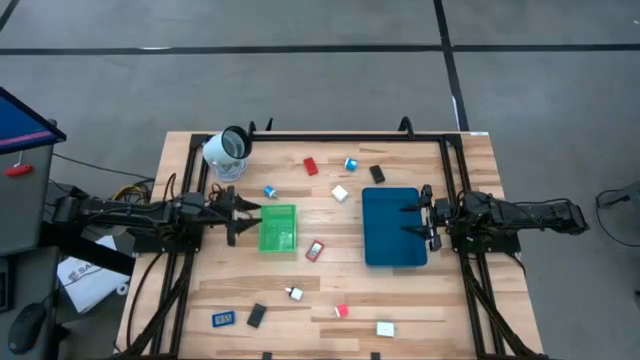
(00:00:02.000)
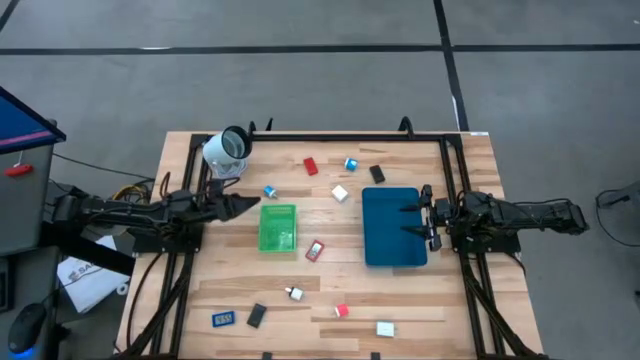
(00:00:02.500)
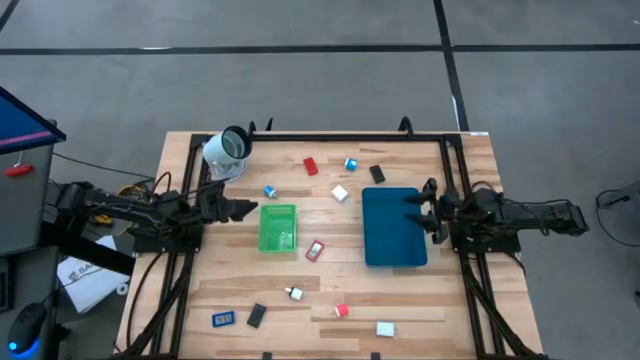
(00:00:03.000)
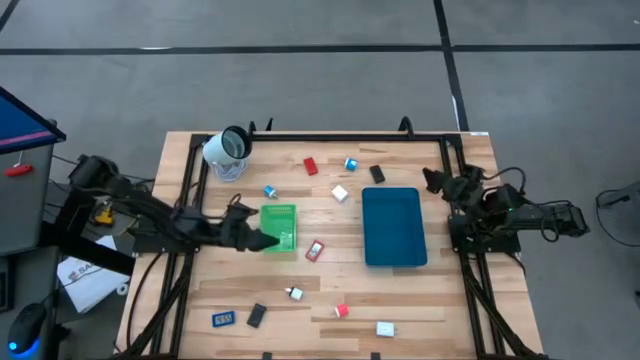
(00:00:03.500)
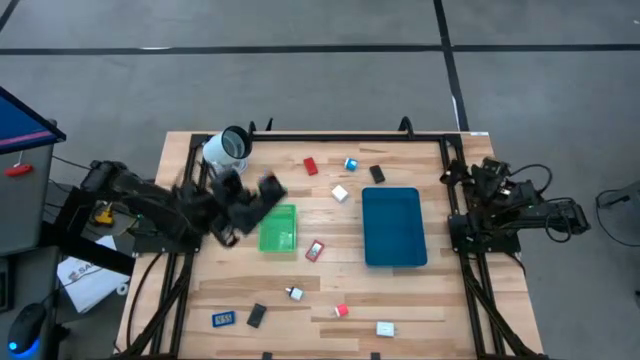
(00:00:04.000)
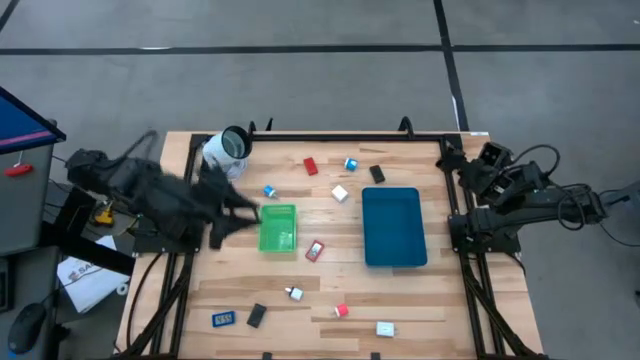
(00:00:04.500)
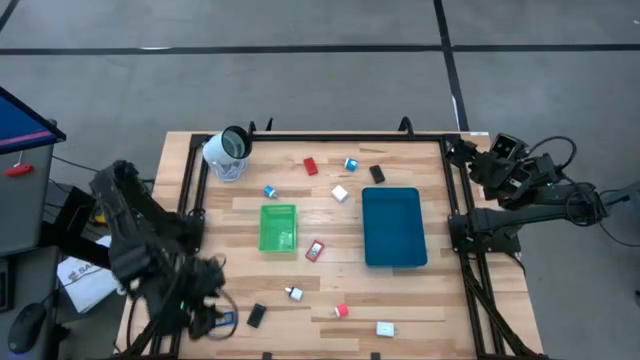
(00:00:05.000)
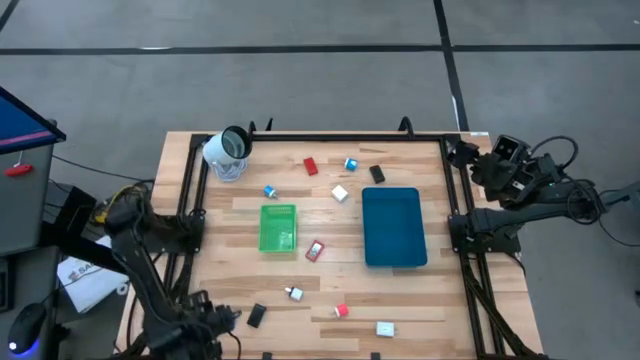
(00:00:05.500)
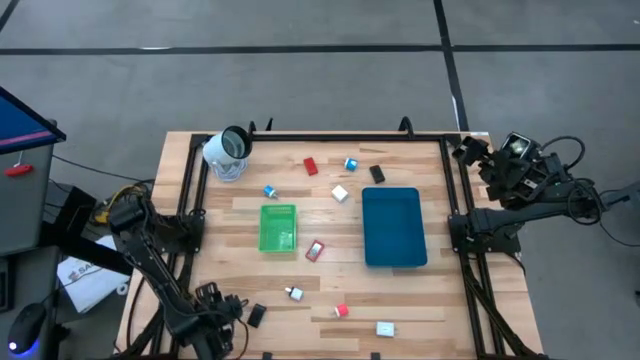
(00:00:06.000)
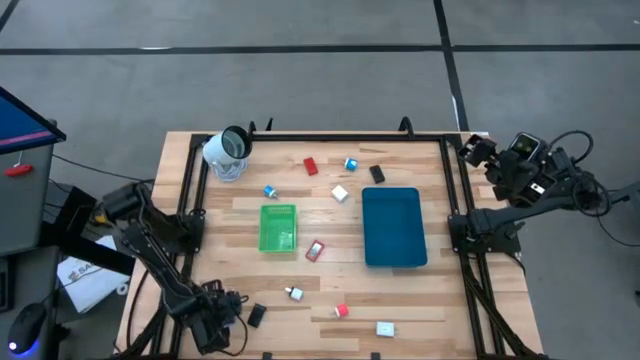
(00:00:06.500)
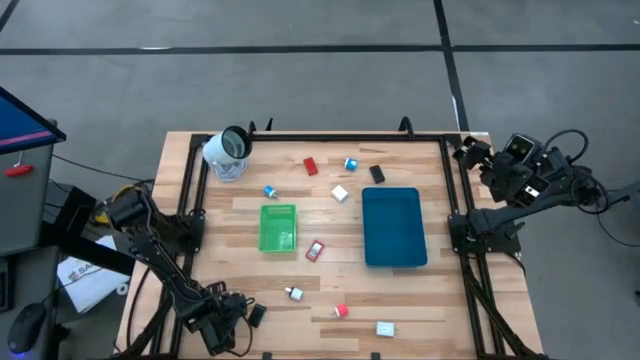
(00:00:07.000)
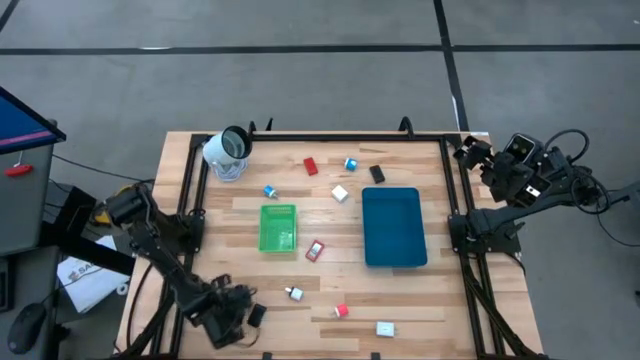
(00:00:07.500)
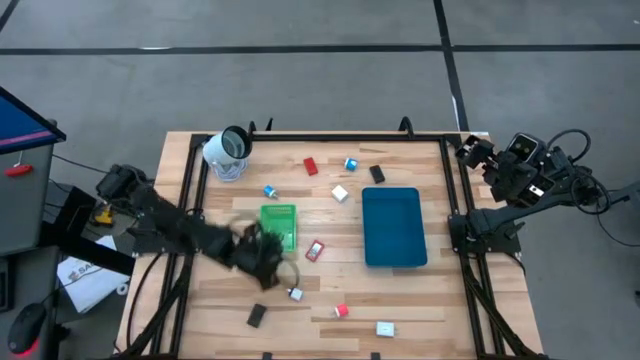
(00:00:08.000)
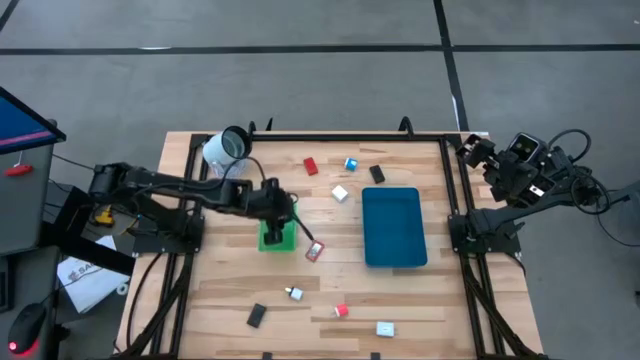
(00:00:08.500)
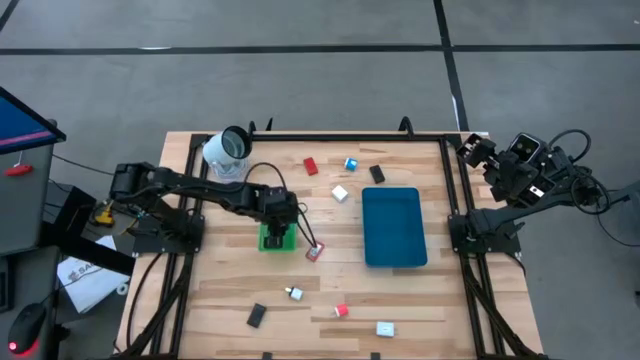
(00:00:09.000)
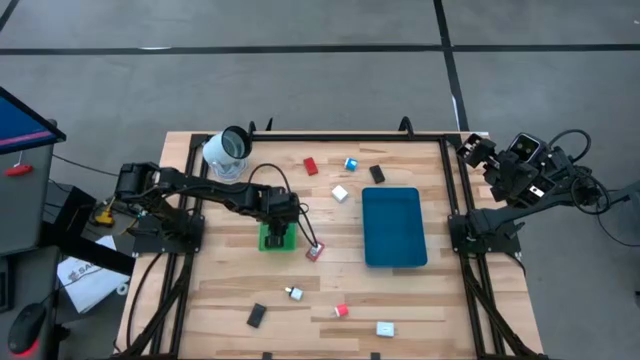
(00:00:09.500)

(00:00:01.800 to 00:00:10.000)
Task: Pick & Place Office items
Put the blue digital timer into the green basket

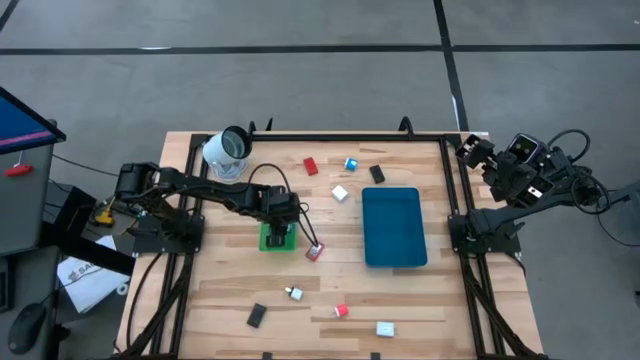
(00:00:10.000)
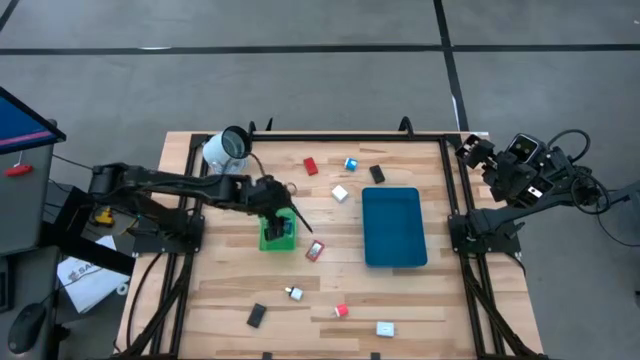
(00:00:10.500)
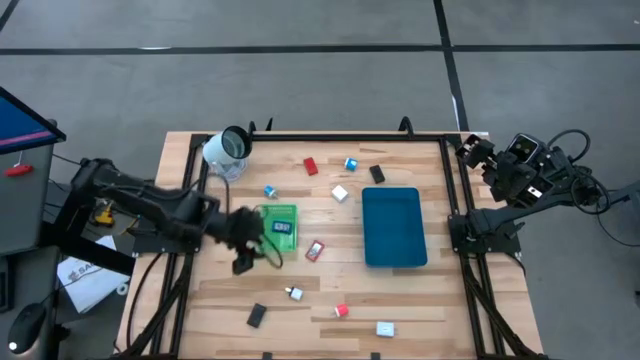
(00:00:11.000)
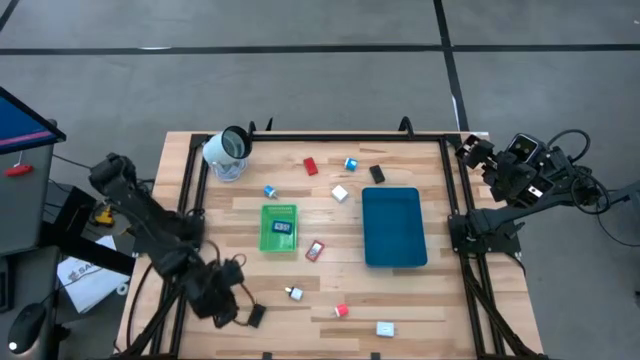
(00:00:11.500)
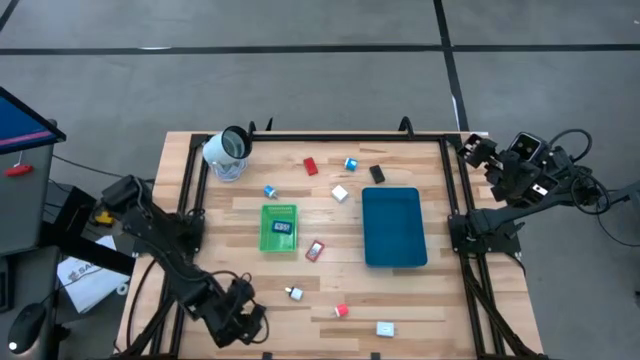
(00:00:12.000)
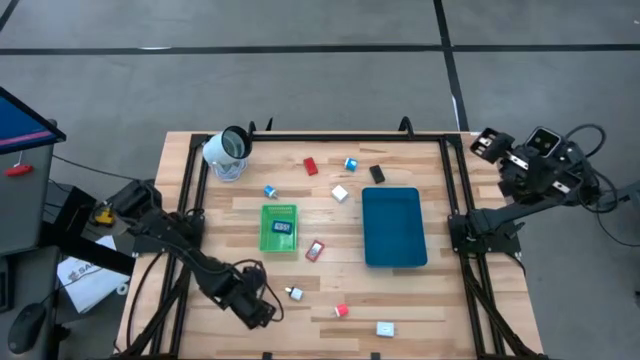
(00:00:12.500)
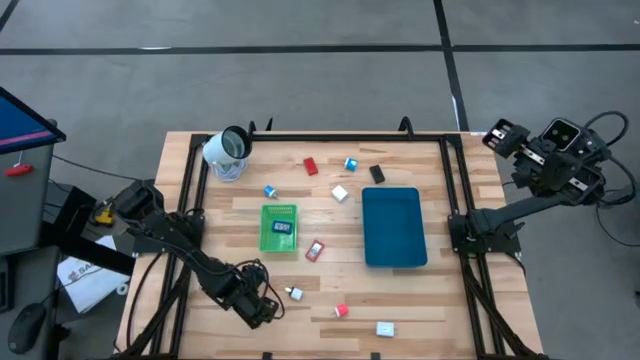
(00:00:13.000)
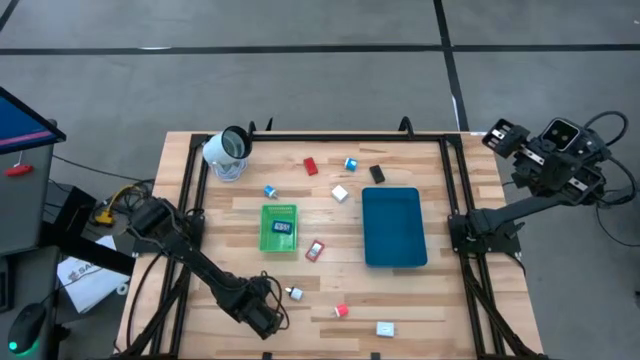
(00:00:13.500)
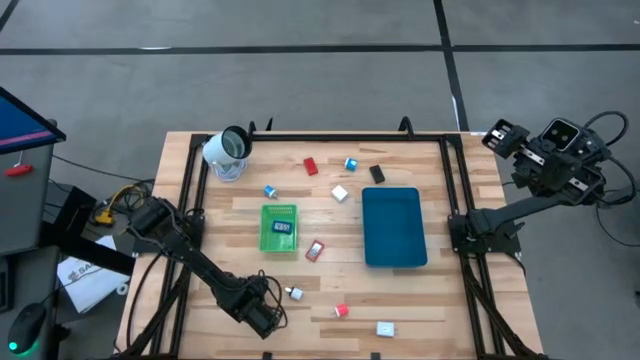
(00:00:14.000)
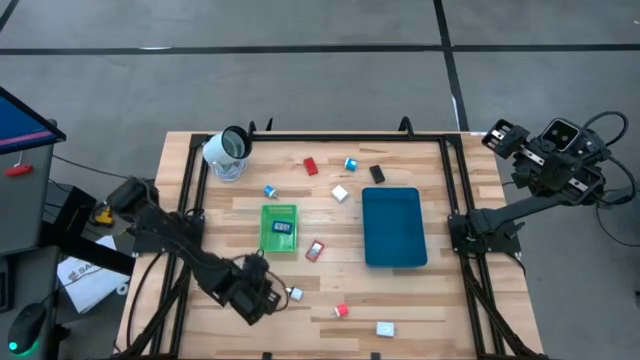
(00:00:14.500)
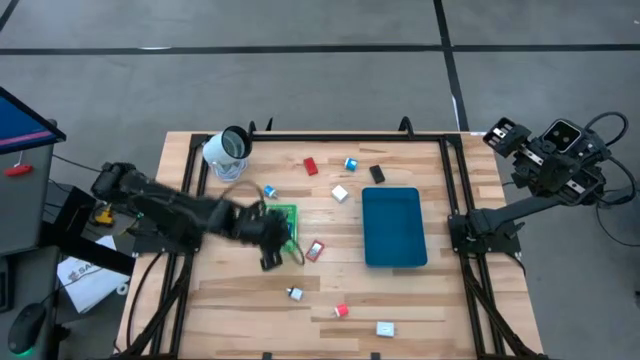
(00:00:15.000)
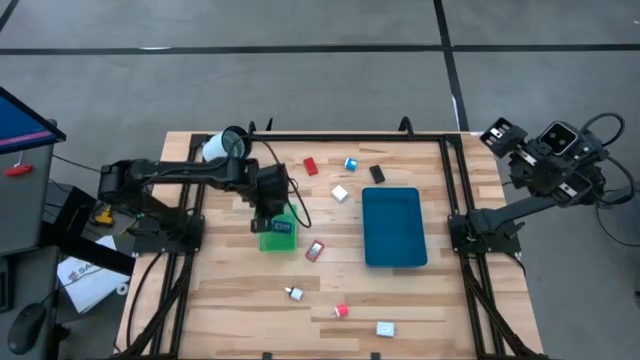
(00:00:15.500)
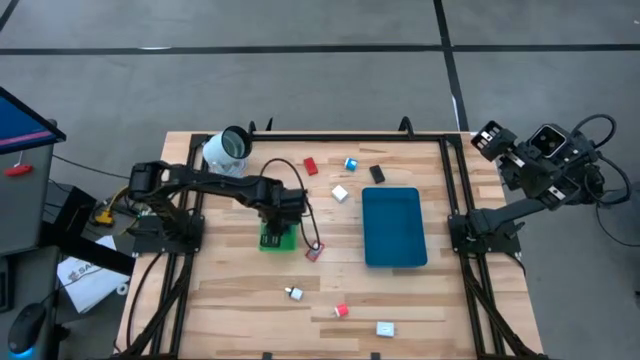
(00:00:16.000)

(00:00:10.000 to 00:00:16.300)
Put the black bottom digital timer into the green basket

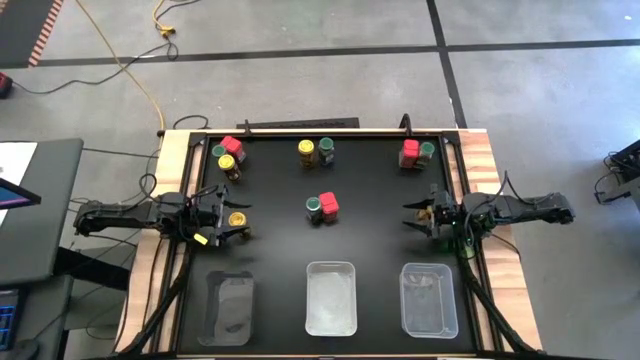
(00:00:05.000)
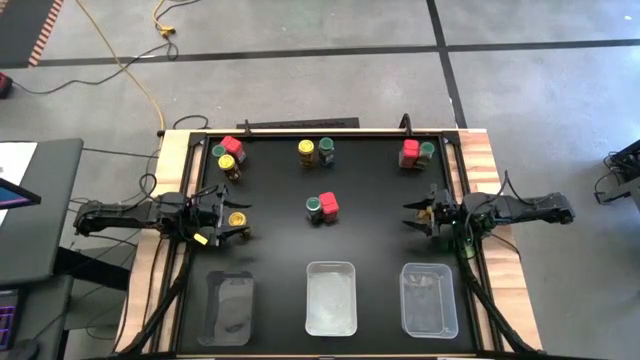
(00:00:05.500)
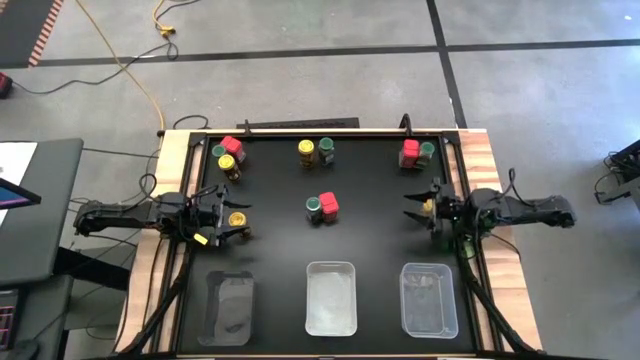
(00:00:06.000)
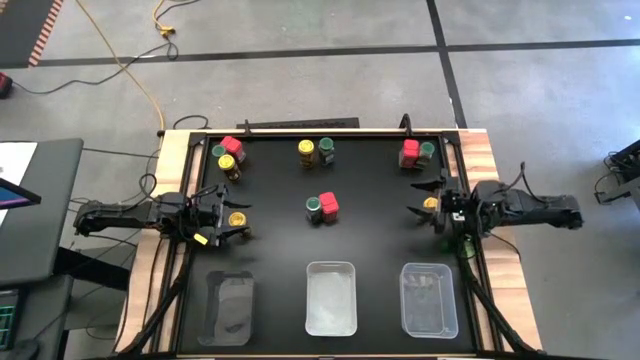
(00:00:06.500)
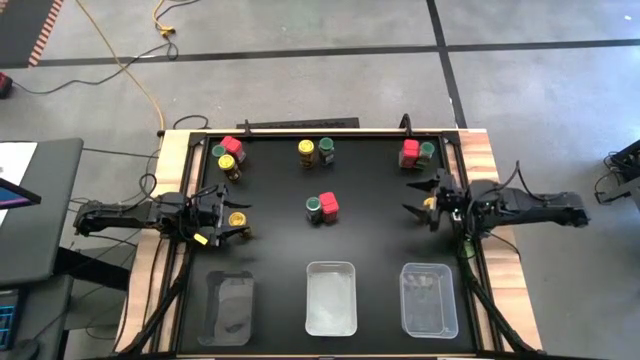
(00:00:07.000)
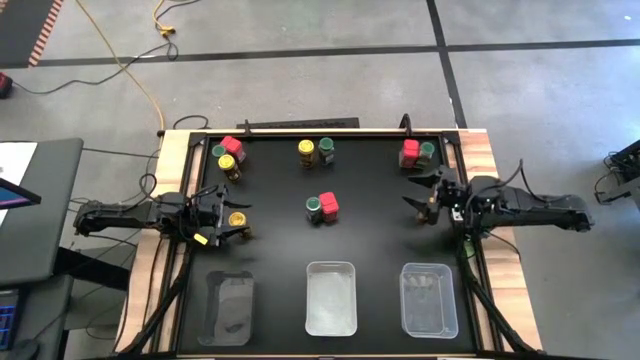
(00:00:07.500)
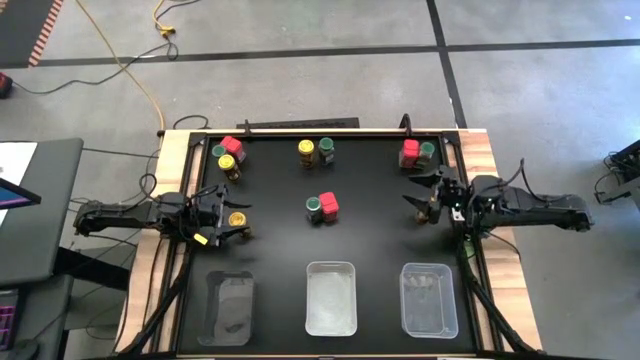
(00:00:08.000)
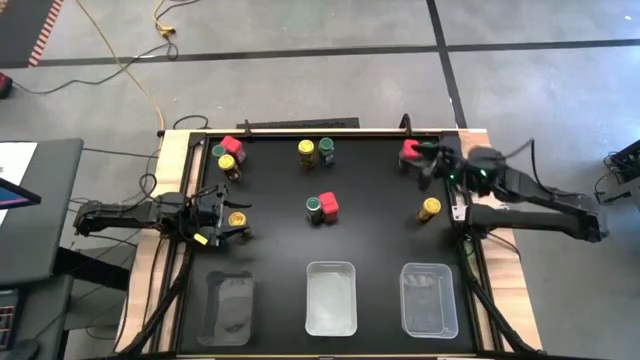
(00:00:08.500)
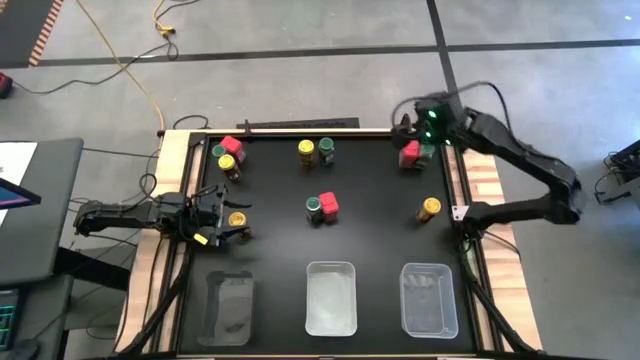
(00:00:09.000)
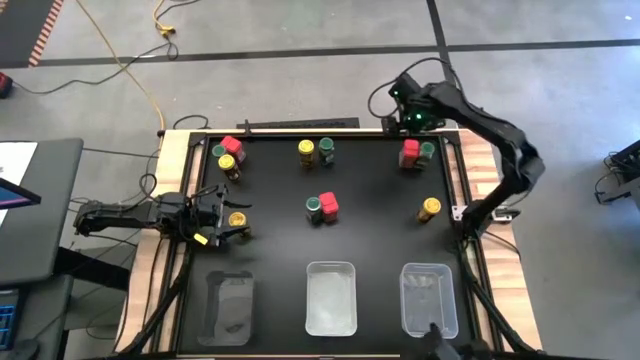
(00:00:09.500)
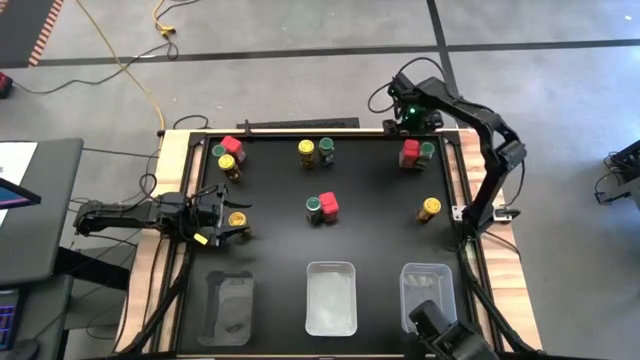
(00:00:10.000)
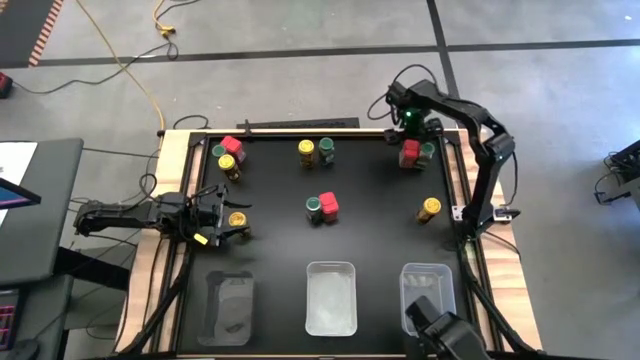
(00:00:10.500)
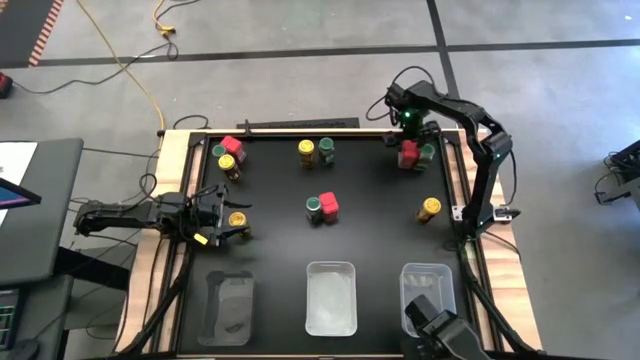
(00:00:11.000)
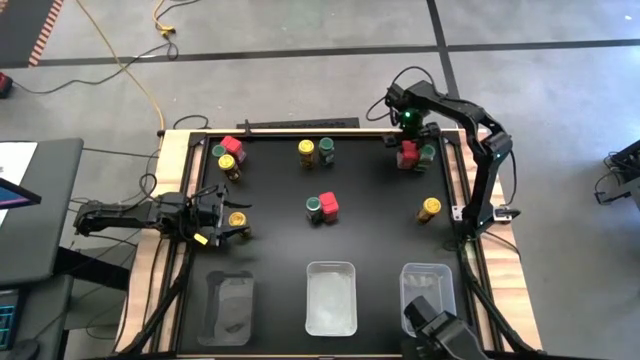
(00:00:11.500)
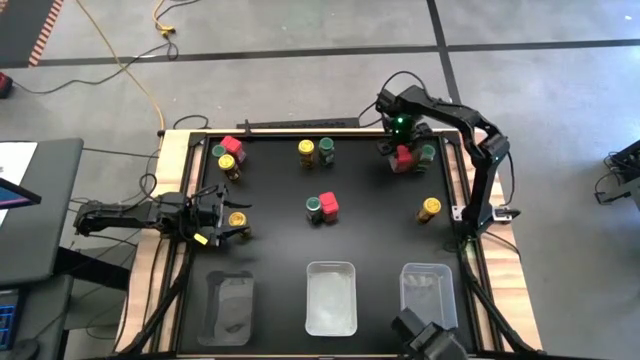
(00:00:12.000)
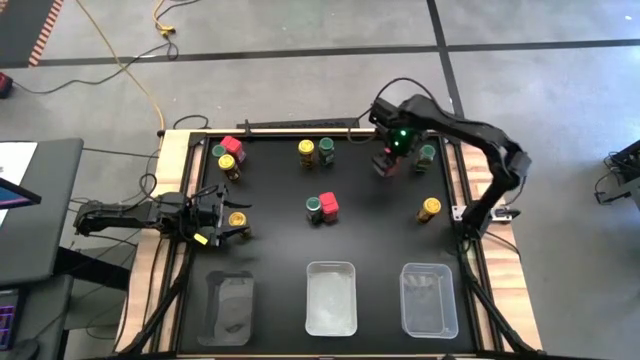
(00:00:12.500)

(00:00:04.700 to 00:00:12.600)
Task: Sort spices by type
Put the top right red seasoning can into the transparent bin
